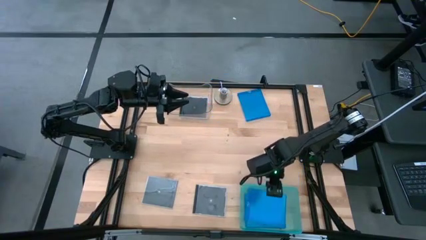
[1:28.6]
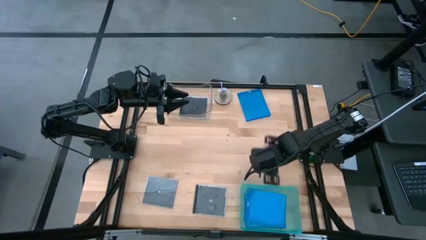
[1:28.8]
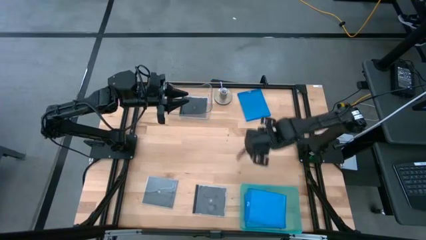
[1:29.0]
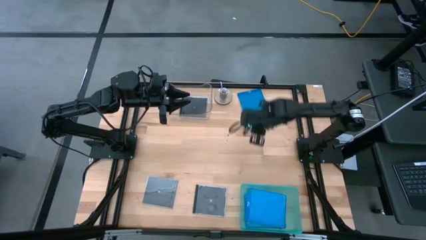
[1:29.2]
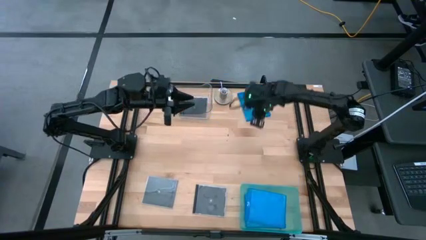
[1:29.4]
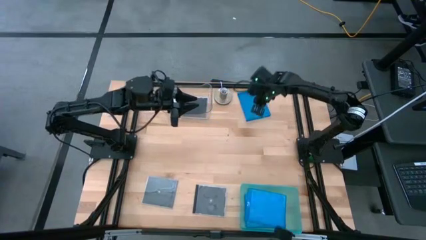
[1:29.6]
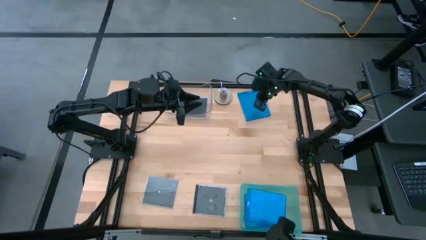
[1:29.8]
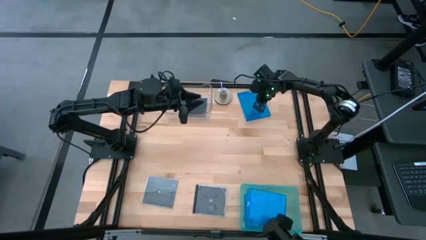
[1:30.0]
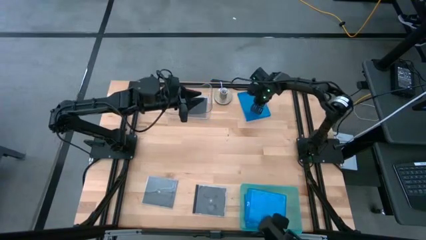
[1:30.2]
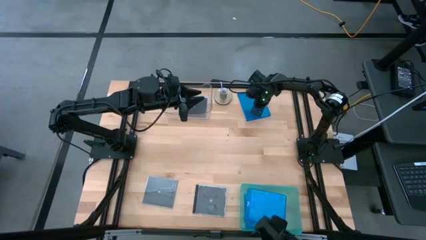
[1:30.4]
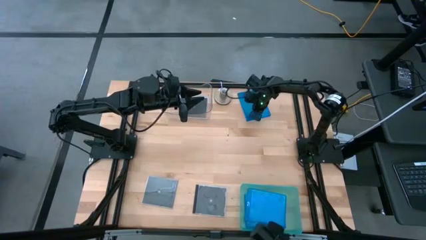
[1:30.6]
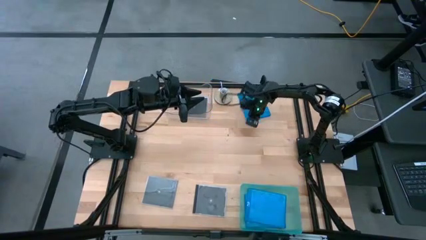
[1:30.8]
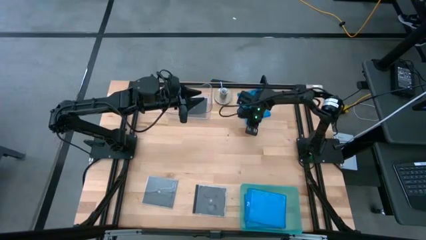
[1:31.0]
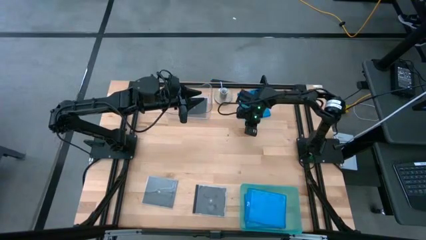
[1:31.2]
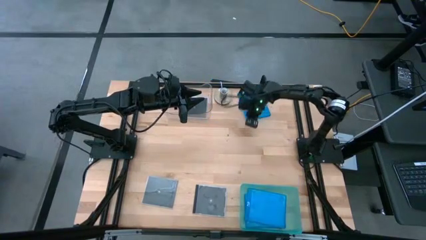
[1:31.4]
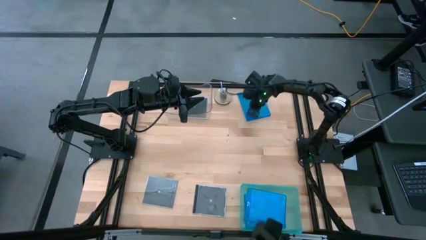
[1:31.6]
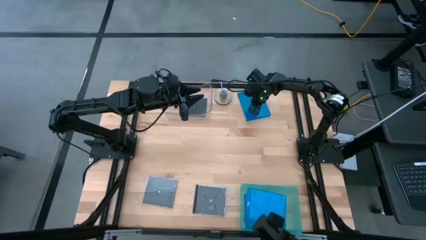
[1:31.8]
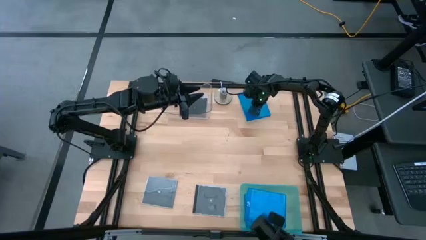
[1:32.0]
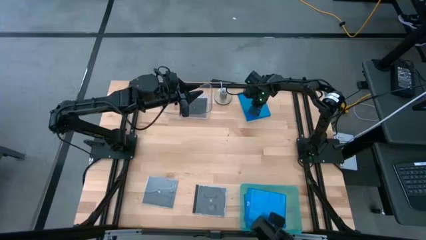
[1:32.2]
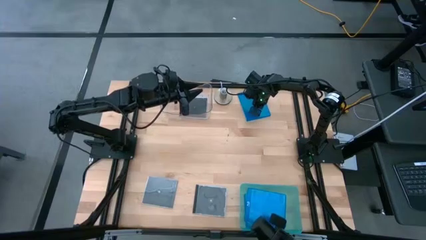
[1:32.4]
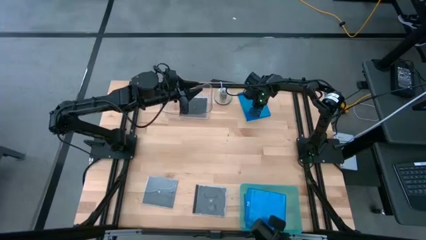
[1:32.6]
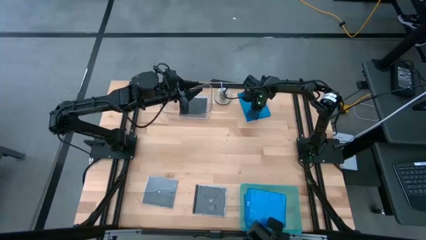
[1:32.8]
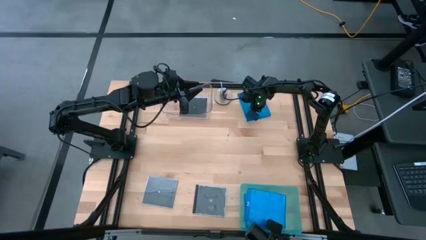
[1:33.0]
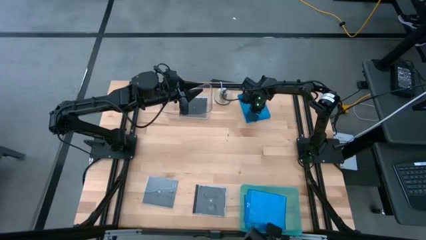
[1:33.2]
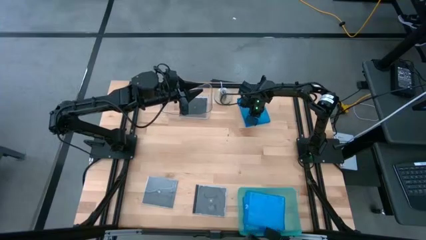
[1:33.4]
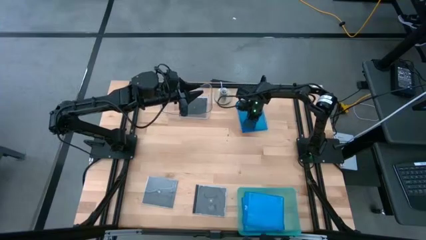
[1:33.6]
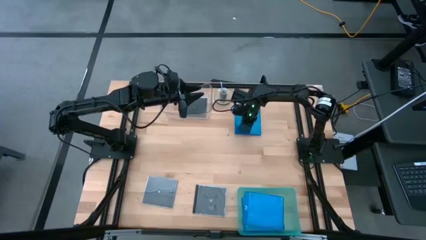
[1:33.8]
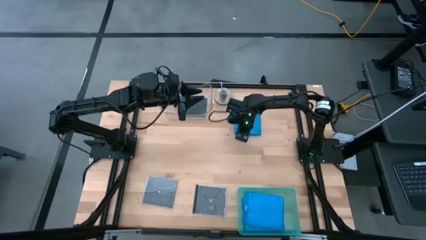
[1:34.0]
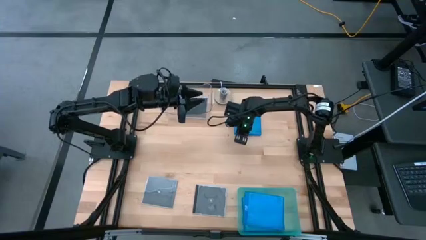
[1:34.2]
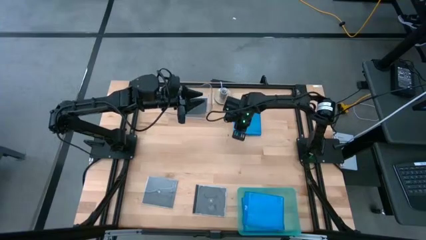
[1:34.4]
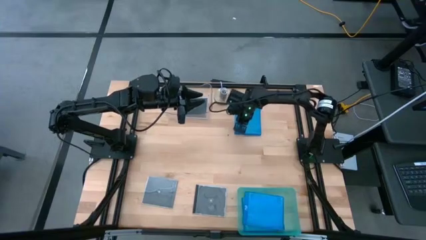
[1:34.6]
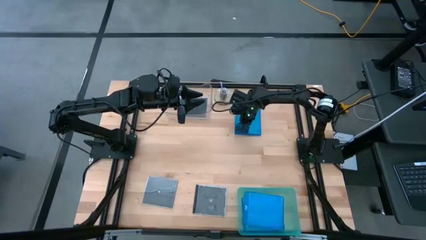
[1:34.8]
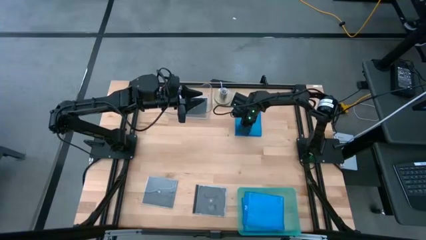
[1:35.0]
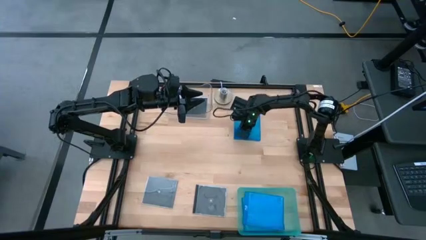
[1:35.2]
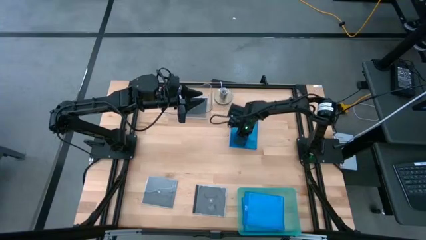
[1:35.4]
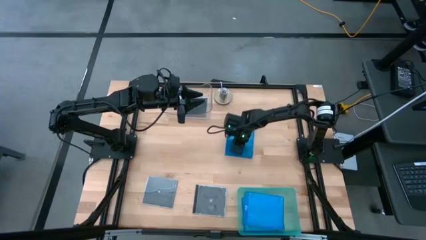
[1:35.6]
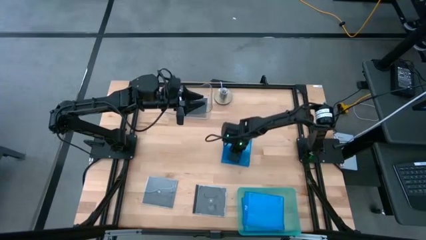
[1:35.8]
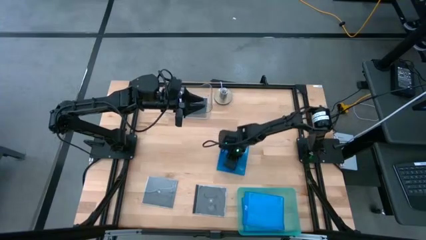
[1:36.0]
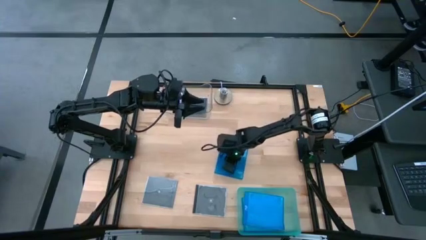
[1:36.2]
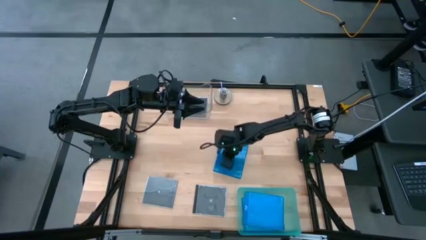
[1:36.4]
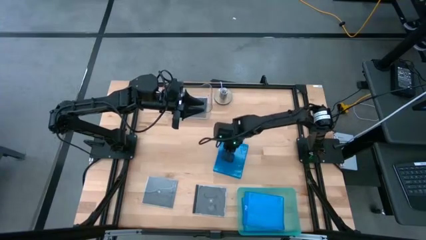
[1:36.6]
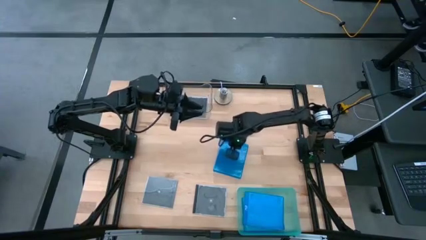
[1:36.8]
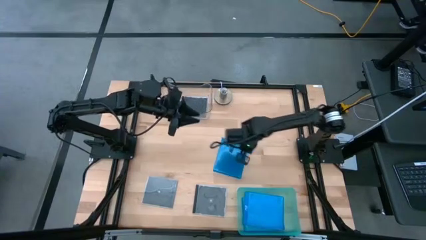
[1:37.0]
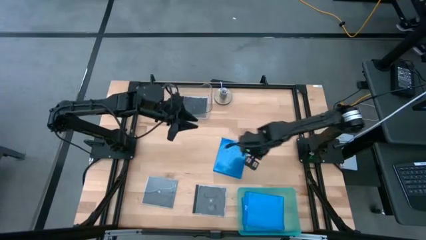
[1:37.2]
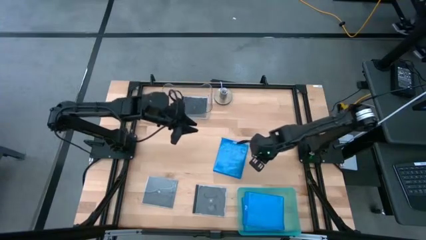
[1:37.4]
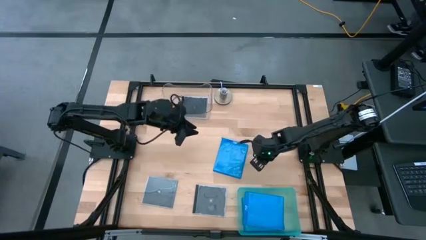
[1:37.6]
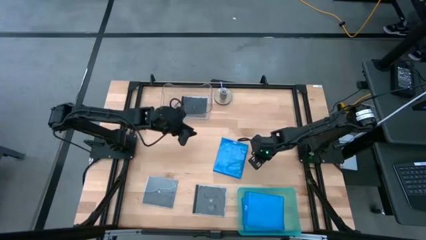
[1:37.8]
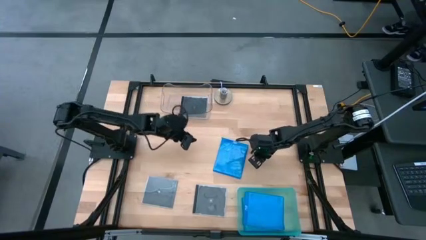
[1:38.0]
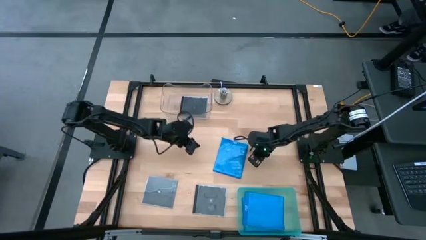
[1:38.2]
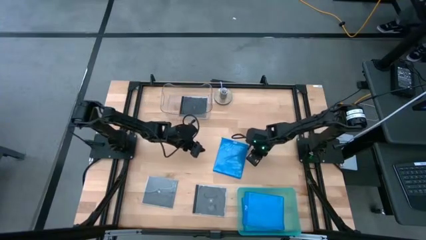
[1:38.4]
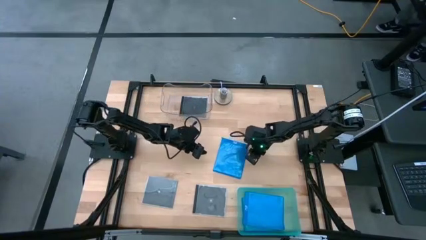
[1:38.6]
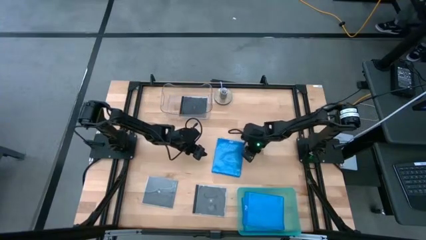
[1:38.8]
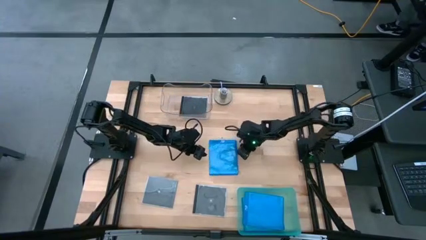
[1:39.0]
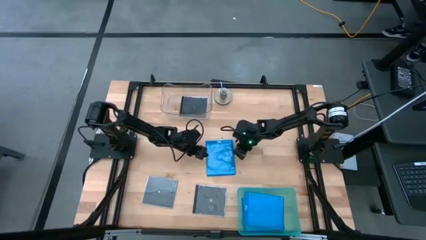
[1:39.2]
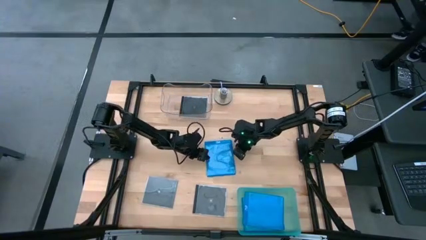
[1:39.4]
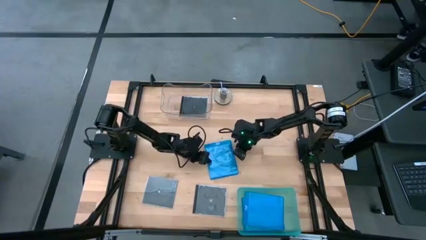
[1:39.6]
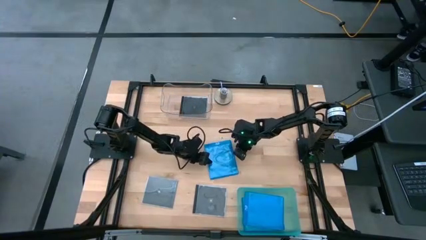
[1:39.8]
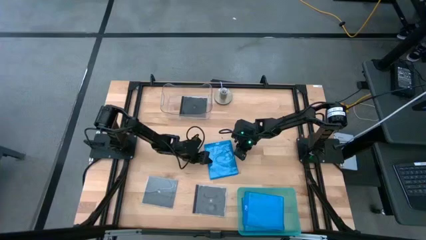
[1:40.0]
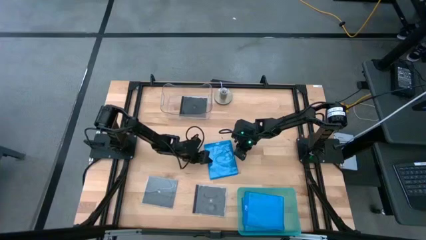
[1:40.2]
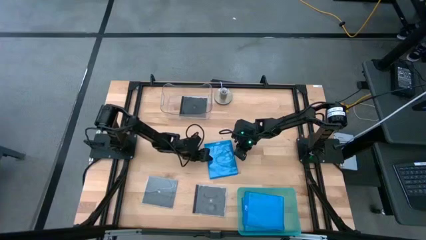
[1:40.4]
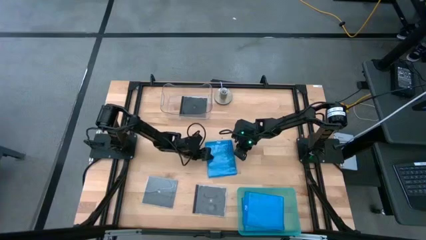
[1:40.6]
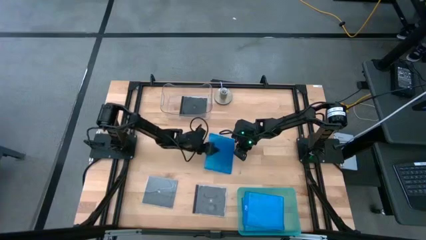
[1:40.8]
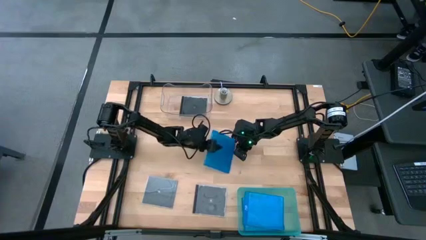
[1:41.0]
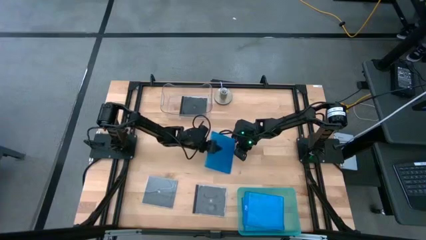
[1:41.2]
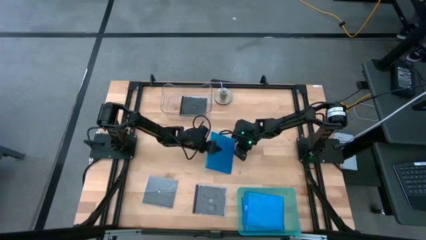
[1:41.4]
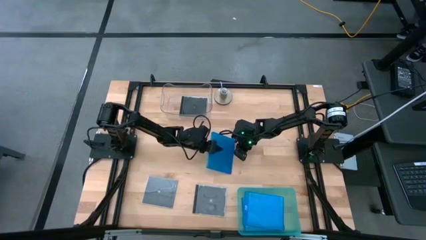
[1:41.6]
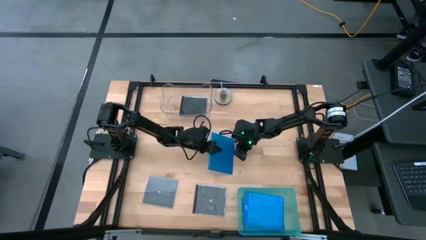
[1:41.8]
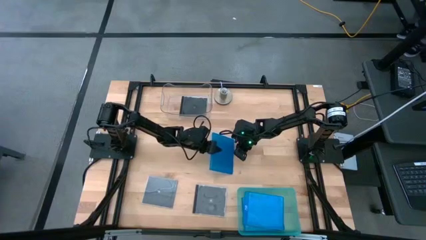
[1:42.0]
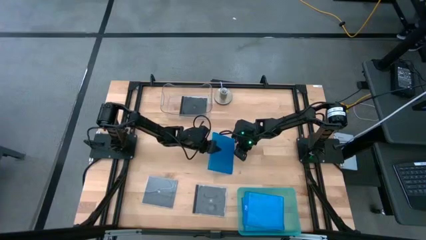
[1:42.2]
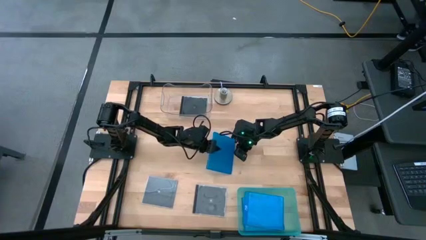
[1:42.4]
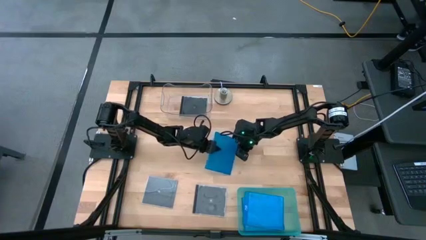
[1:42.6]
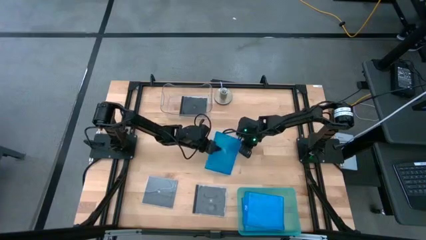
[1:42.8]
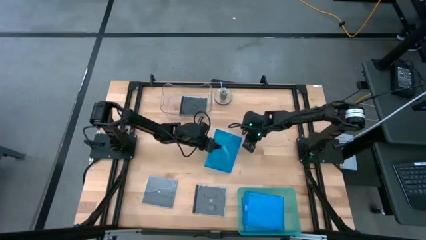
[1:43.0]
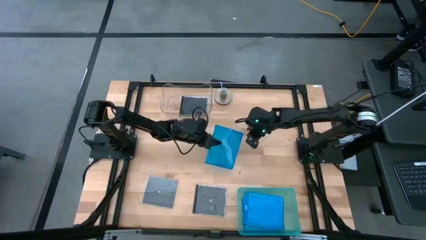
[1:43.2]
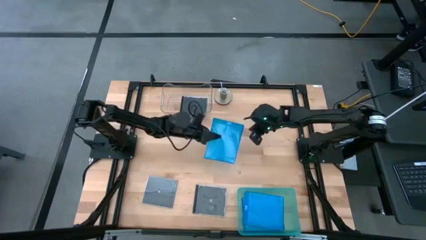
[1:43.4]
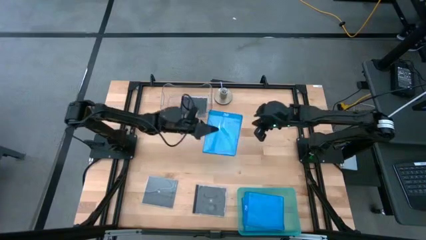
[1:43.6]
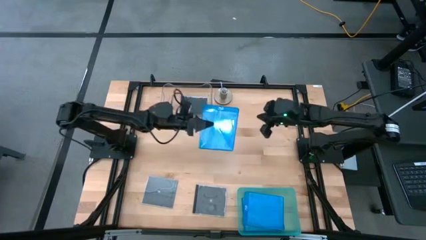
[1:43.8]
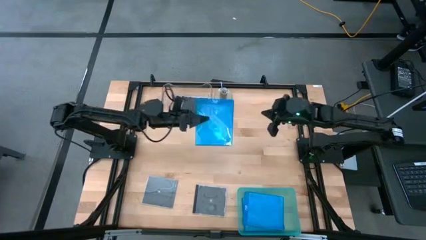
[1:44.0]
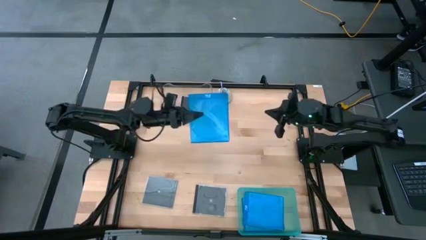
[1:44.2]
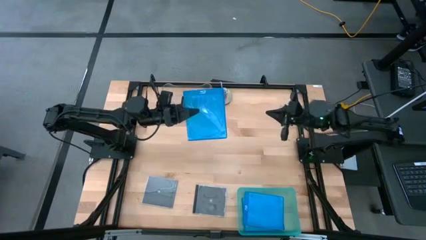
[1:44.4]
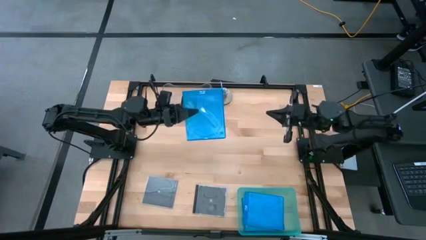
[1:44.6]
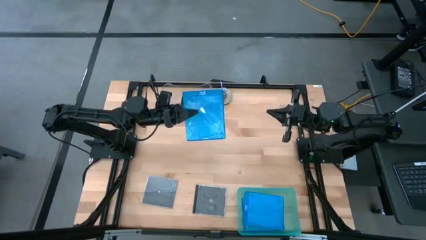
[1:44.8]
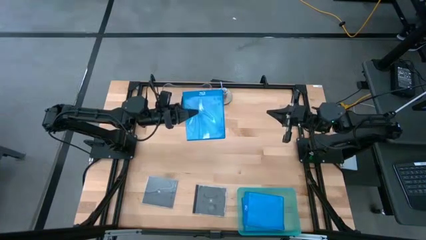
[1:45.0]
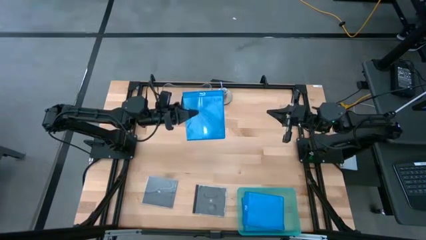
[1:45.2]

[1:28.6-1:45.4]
Task: Pick & place jewel cases by type
Put the blue cd case into the green bin
